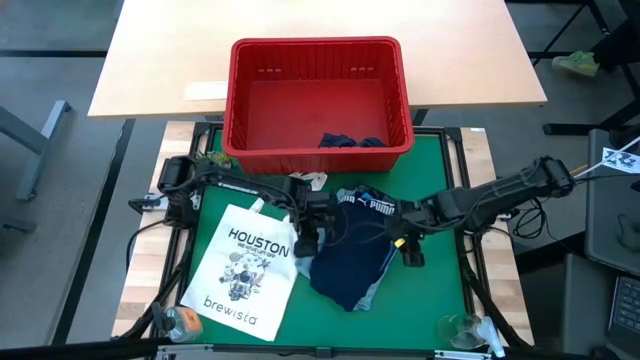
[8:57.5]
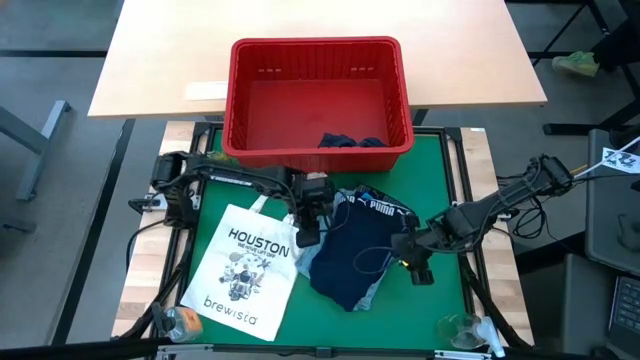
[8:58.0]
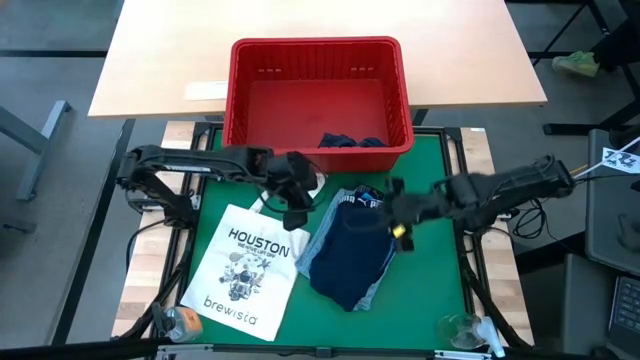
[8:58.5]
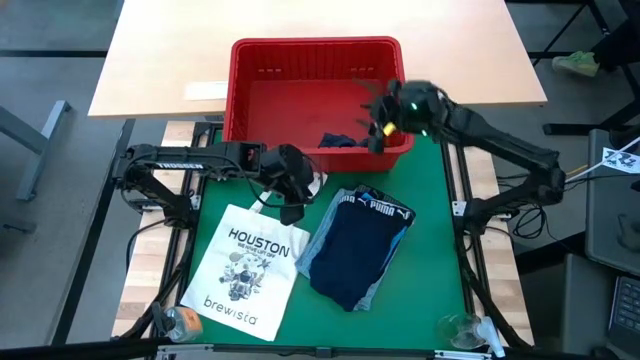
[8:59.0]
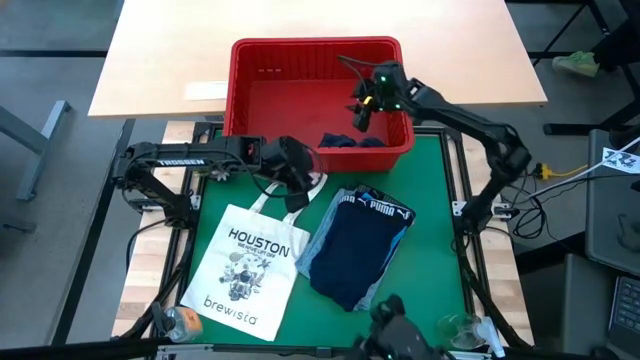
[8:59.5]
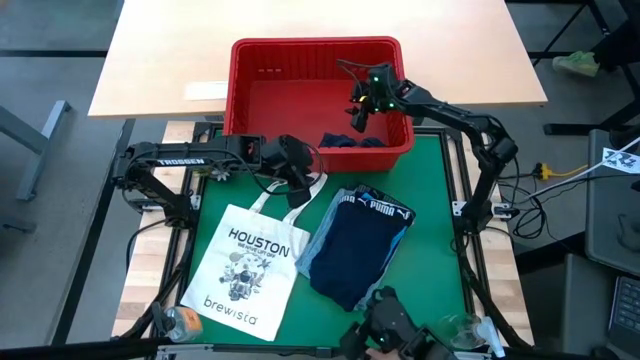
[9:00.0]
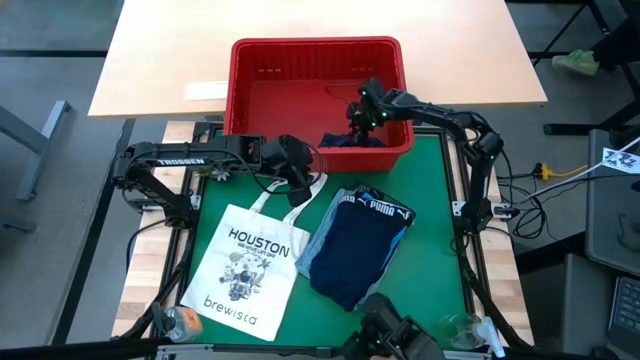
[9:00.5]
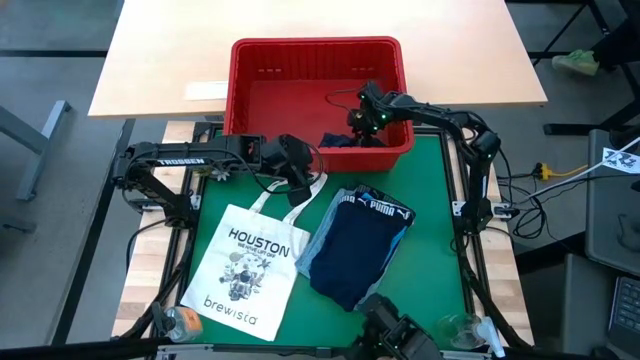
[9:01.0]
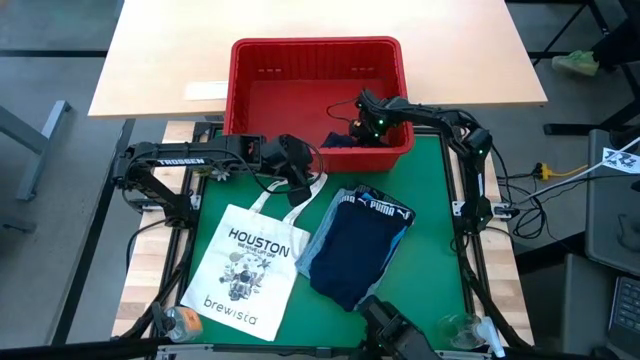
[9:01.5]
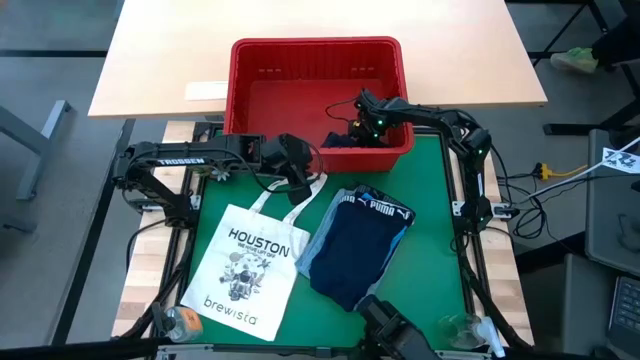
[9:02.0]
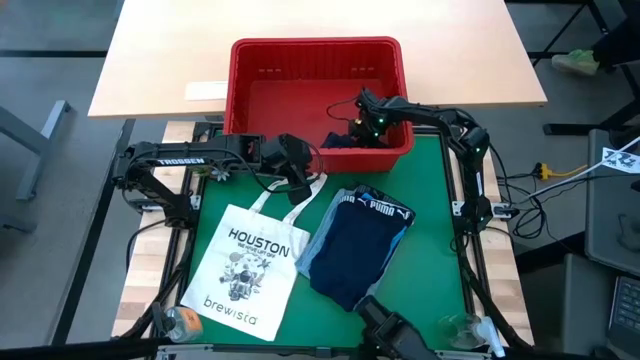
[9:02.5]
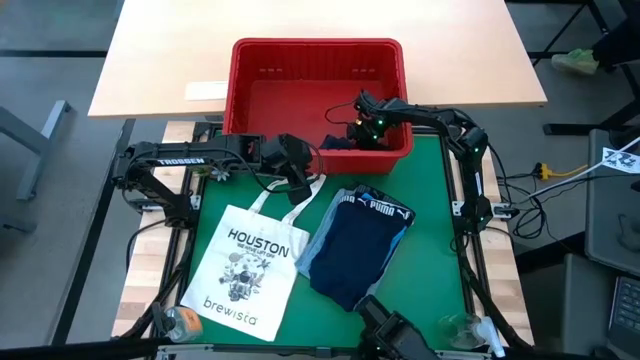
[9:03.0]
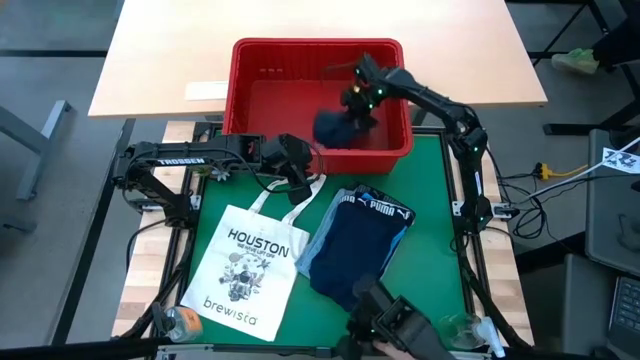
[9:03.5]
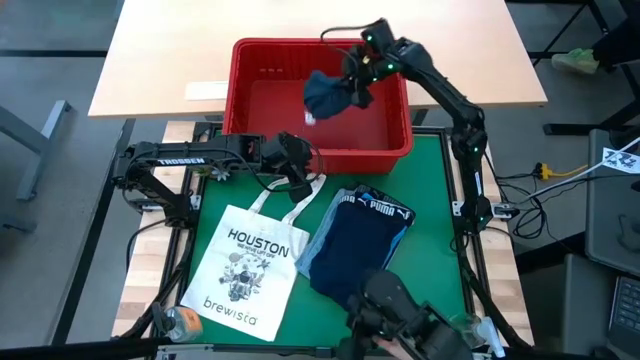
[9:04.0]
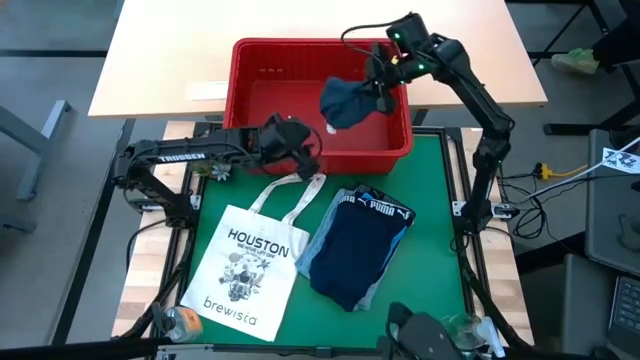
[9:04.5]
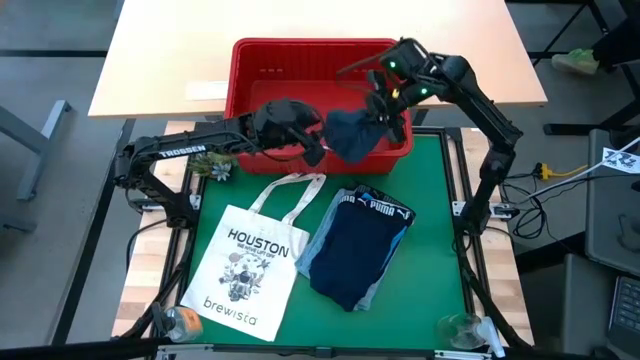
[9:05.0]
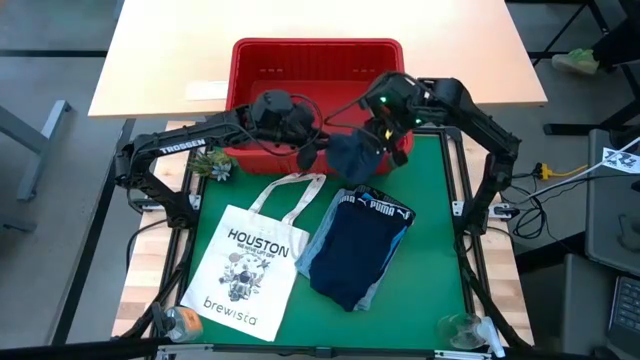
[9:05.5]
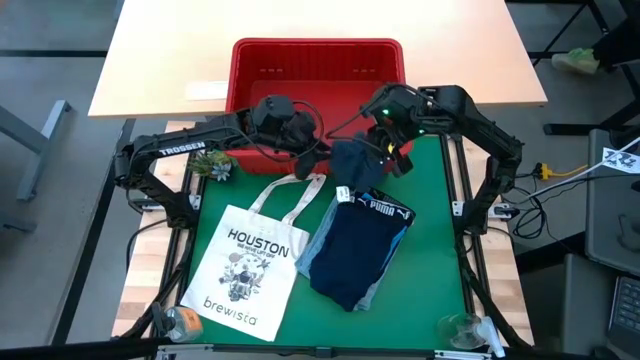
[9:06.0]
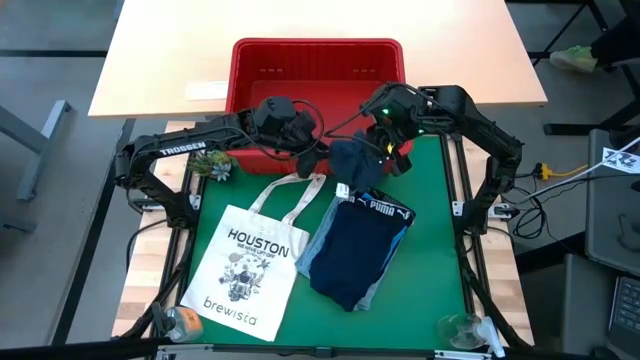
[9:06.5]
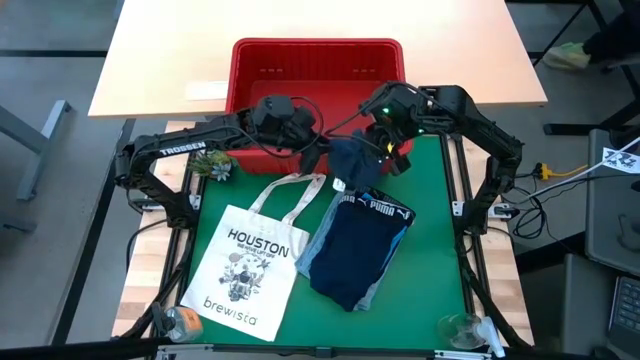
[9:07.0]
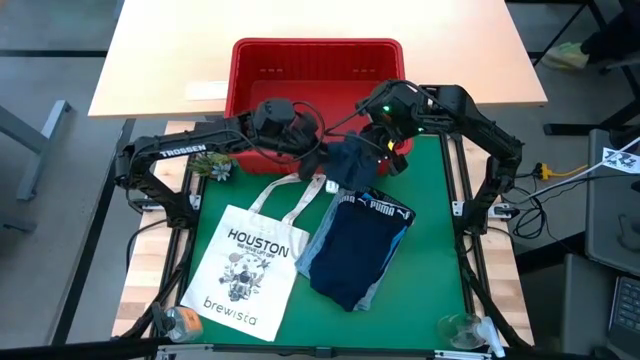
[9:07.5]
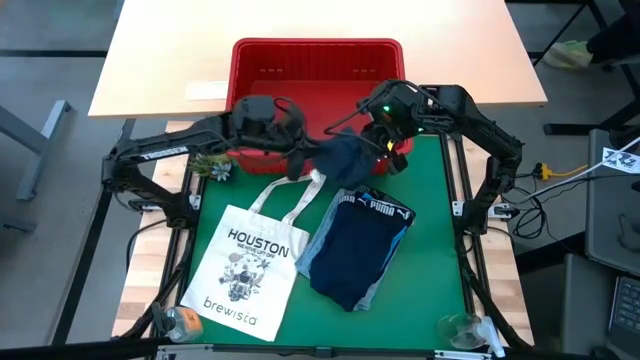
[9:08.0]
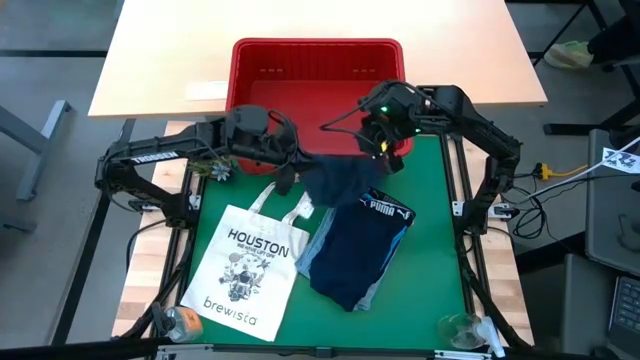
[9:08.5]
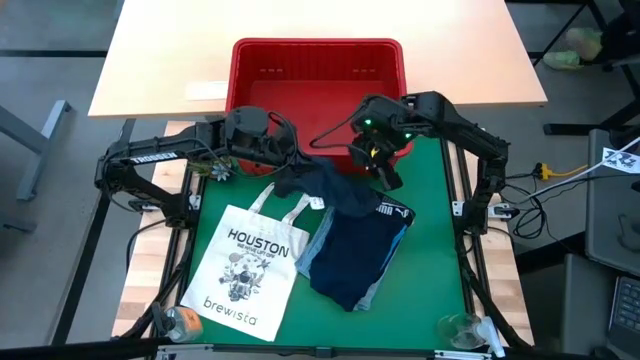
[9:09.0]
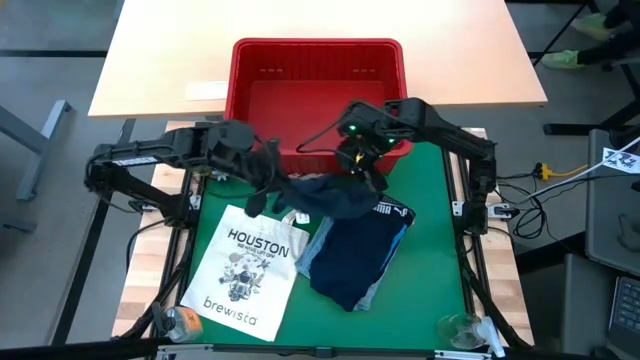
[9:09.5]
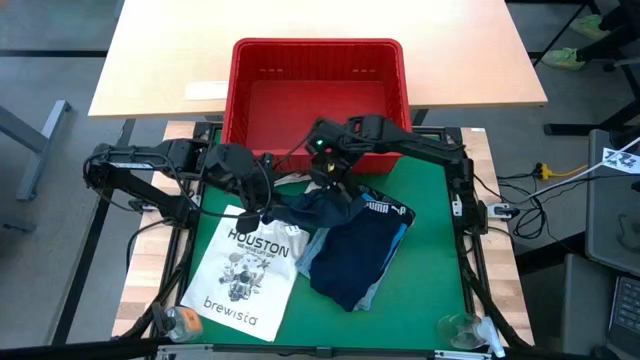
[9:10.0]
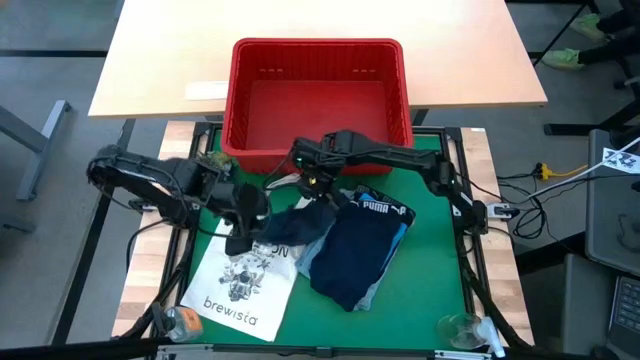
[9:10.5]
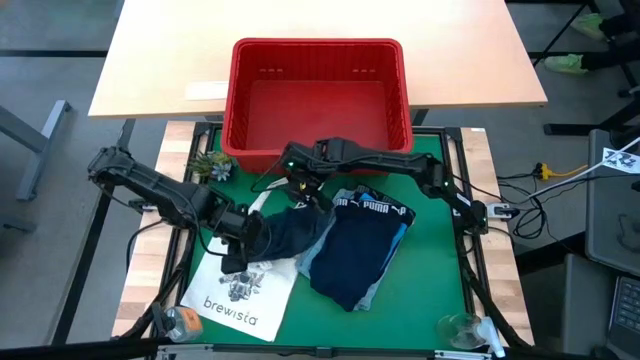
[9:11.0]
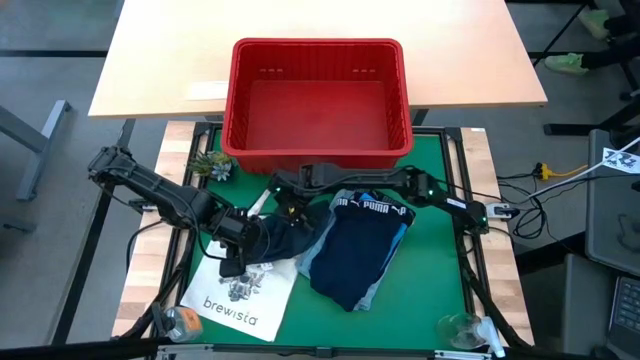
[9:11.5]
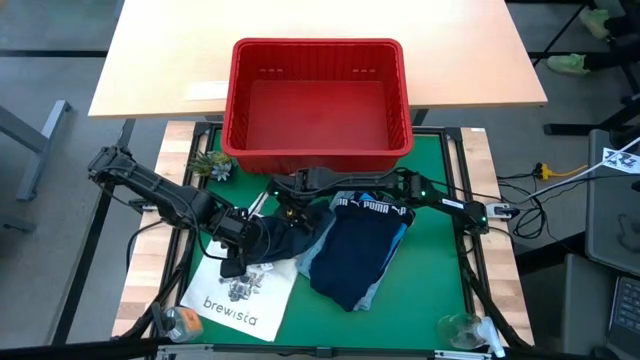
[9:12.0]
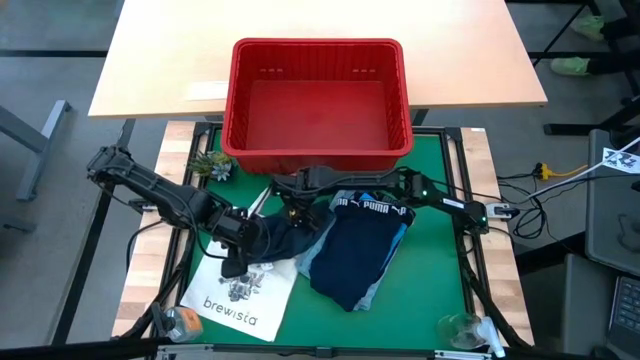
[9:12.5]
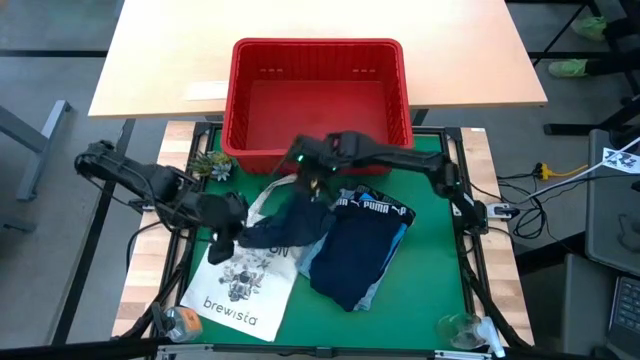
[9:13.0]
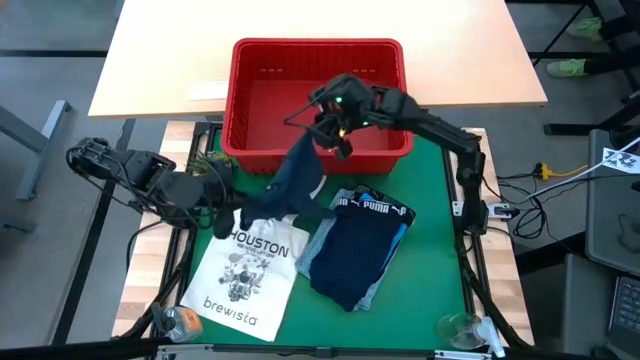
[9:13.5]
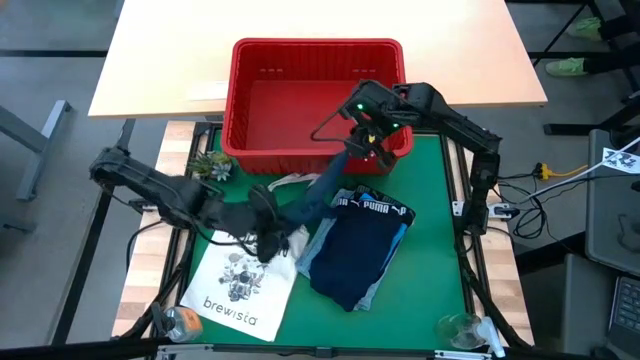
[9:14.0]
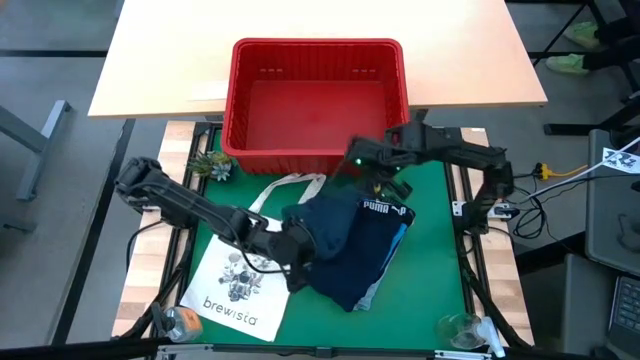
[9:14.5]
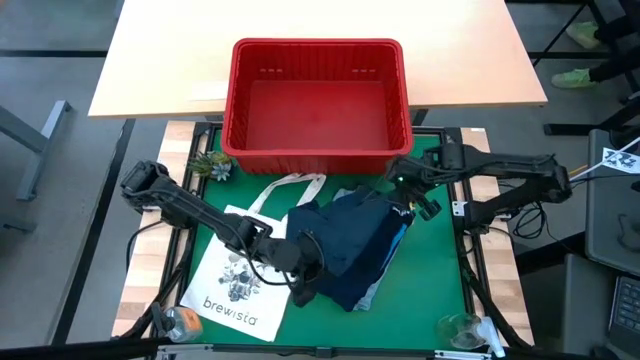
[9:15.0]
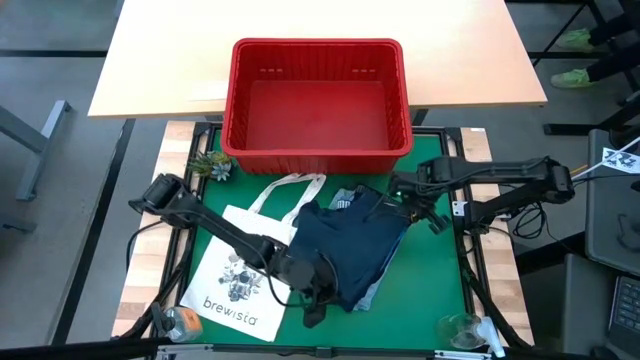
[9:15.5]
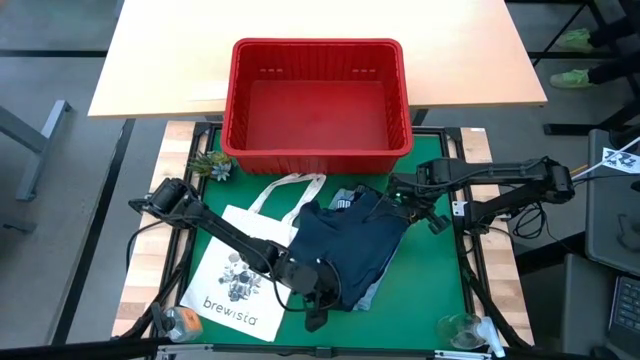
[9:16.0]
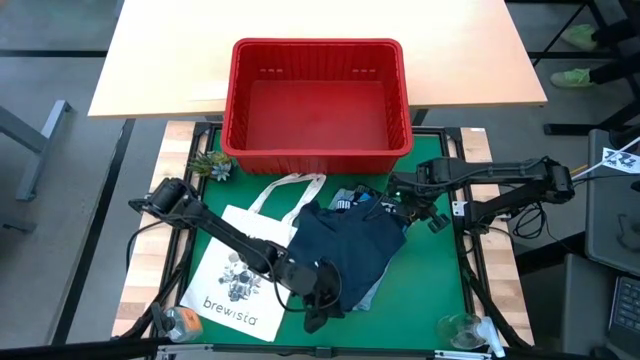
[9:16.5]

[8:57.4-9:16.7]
Task: Fold Laundry from Bin
Fold the gray short
